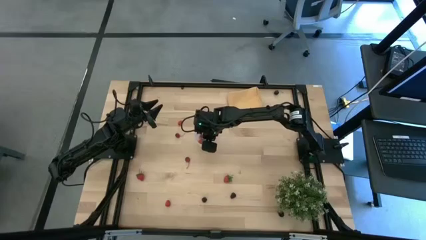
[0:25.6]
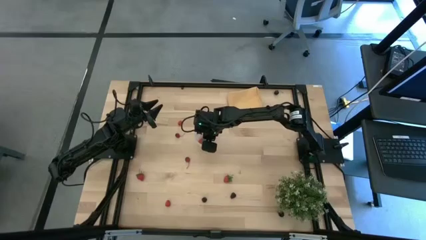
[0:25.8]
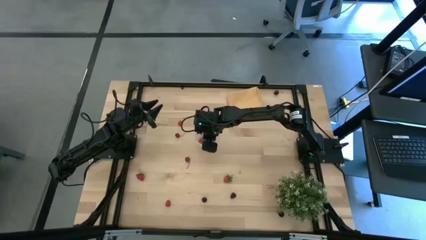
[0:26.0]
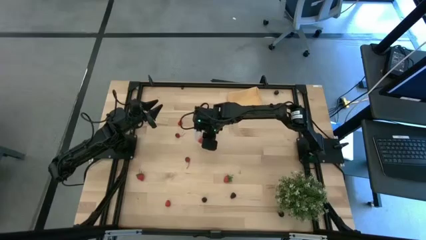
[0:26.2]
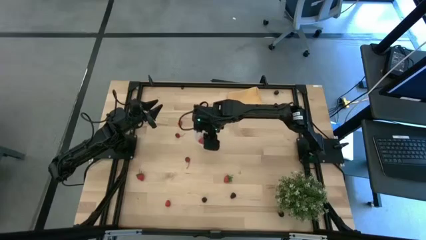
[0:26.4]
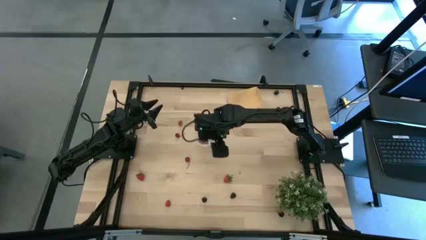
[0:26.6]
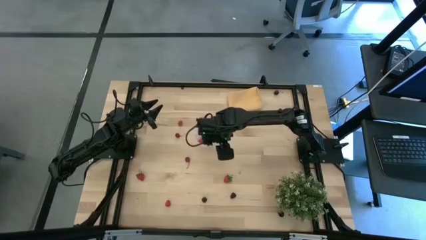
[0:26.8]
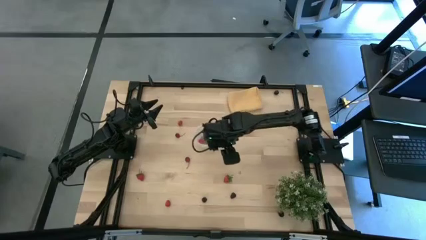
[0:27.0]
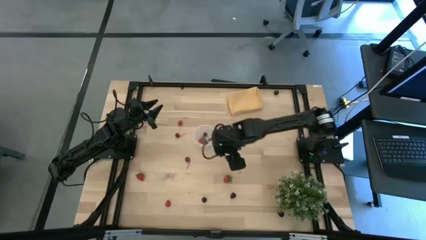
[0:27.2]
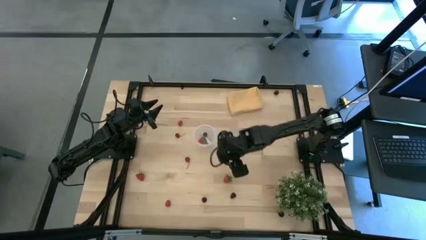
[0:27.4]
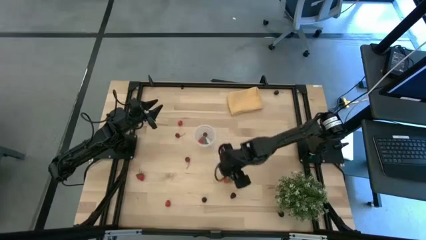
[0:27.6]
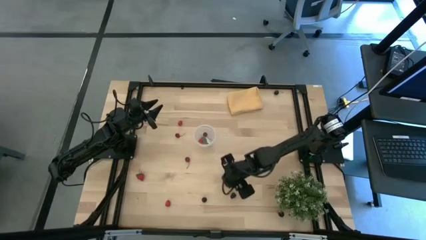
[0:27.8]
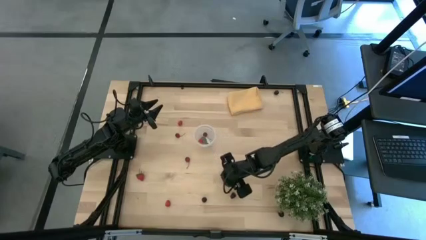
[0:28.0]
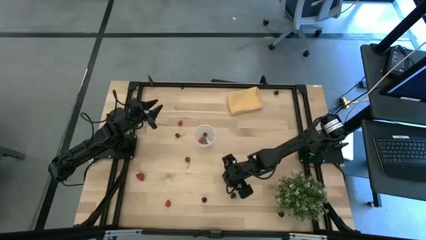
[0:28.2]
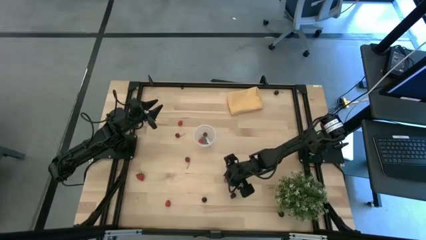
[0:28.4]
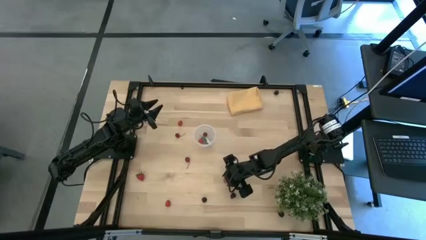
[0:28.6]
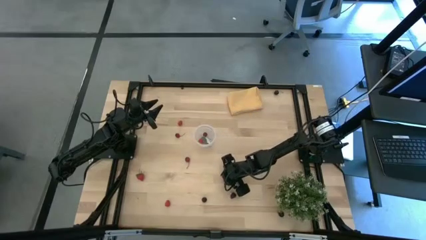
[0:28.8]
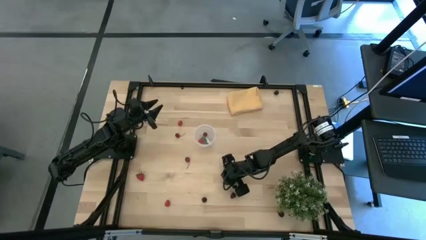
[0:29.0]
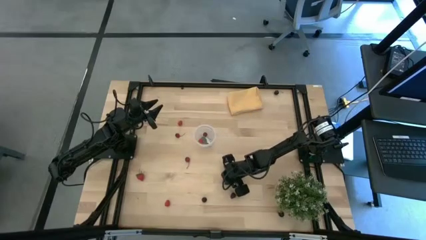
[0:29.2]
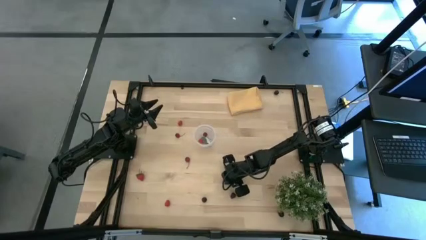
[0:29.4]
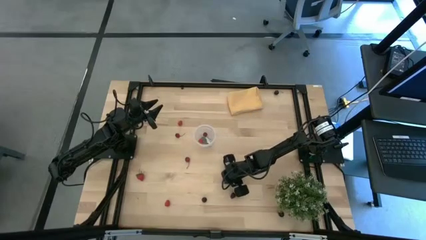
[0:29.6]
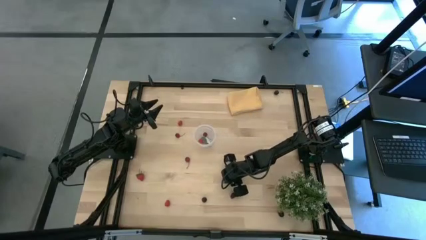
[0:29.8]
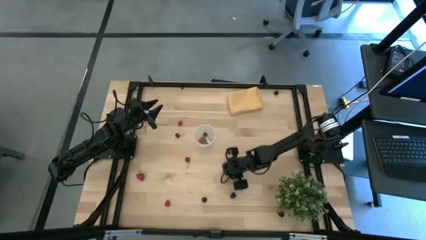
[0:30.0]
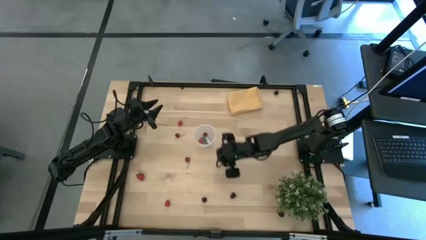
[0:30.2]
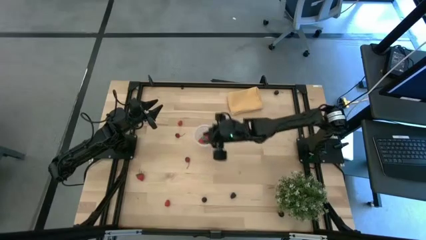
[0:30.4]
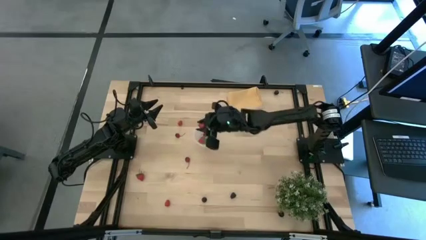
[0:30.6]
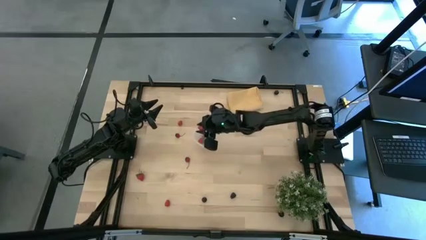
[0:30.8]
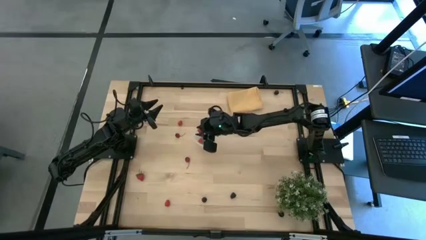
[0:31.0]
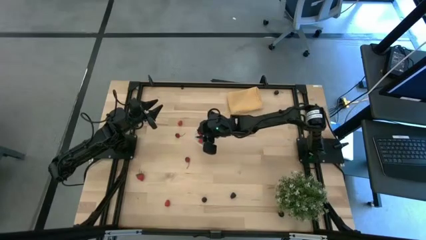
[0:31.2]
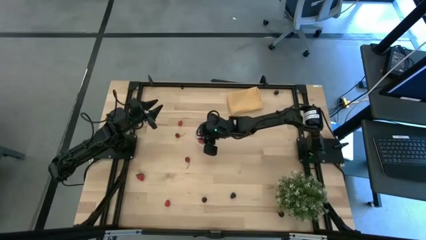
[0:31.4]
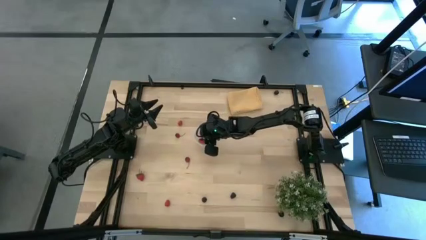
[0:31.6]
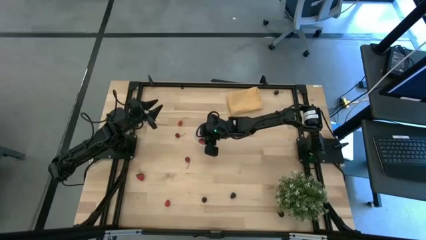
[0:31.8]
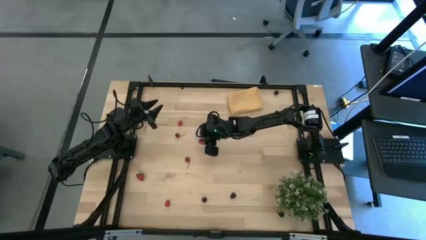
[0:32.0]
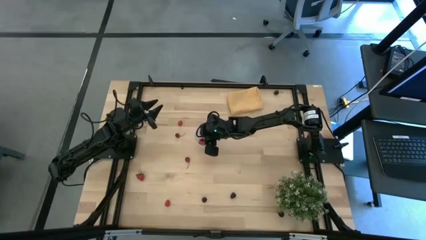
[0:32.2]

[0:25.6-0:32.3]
Task: Pick and placing Produce into tupperware
Put the right red strawberry into the transparent container

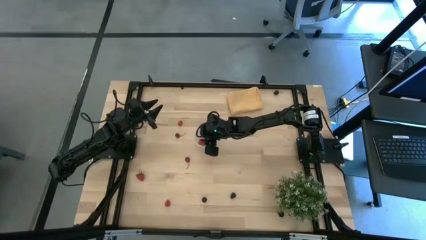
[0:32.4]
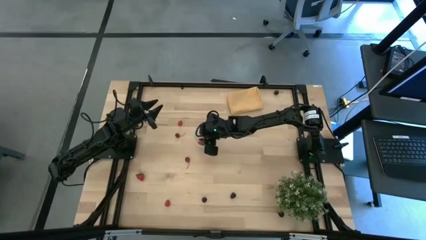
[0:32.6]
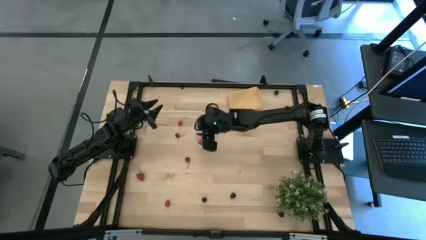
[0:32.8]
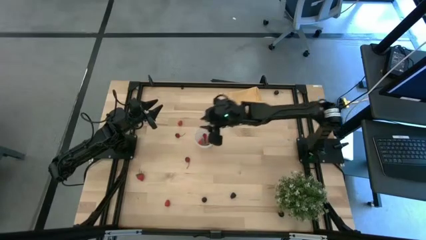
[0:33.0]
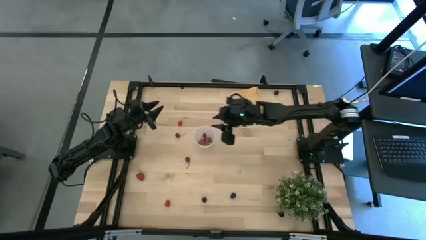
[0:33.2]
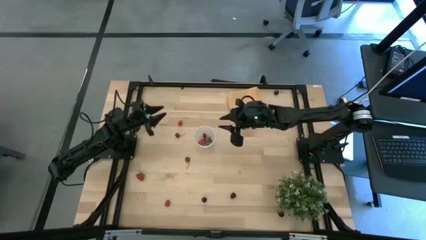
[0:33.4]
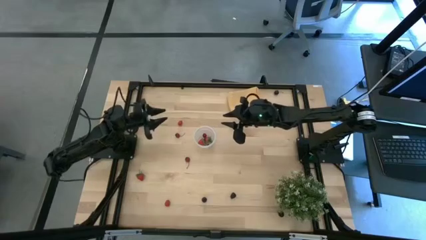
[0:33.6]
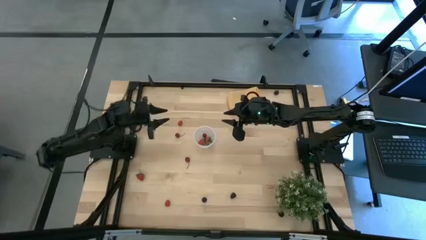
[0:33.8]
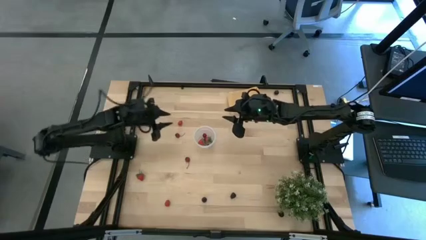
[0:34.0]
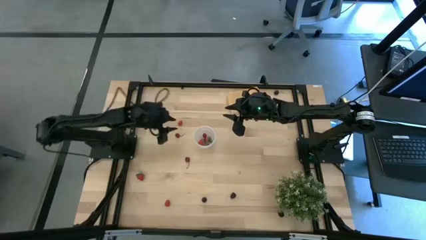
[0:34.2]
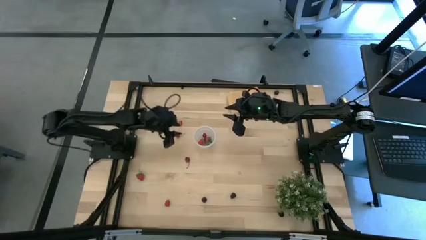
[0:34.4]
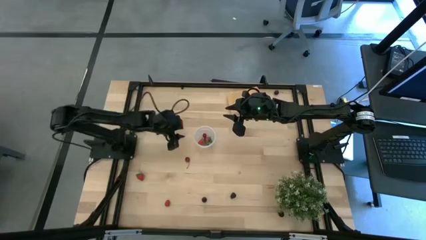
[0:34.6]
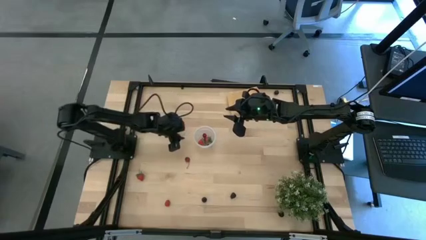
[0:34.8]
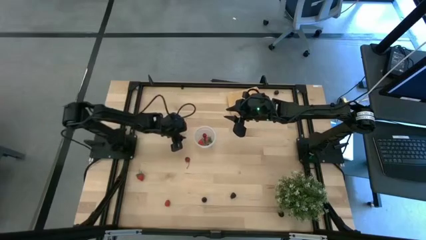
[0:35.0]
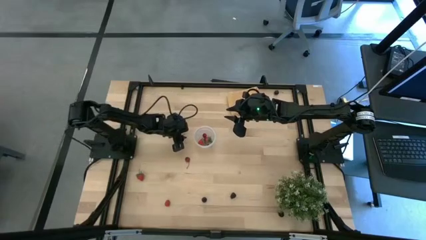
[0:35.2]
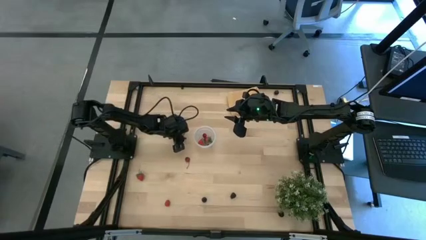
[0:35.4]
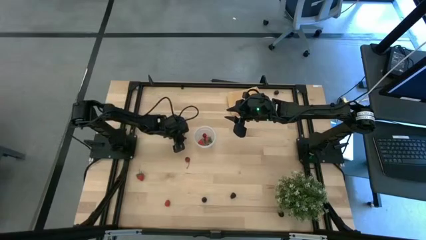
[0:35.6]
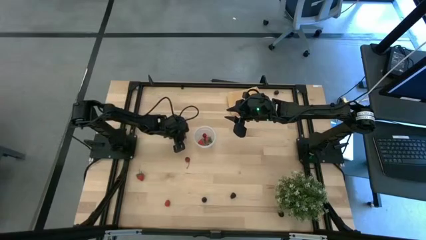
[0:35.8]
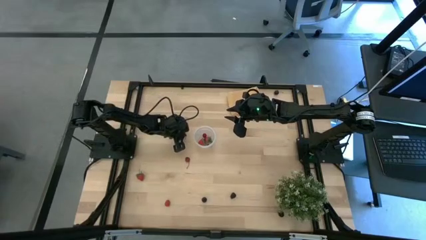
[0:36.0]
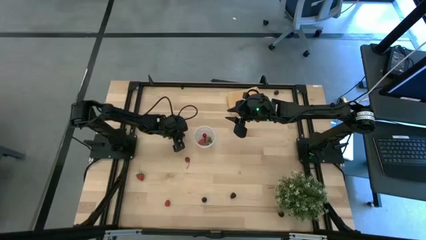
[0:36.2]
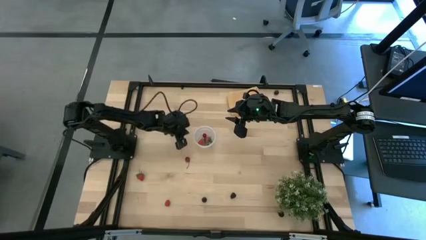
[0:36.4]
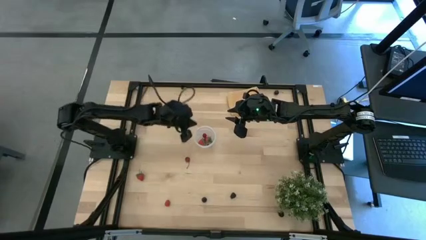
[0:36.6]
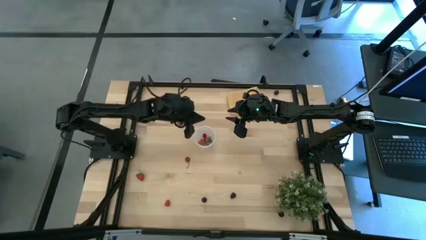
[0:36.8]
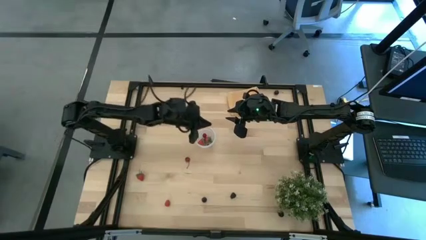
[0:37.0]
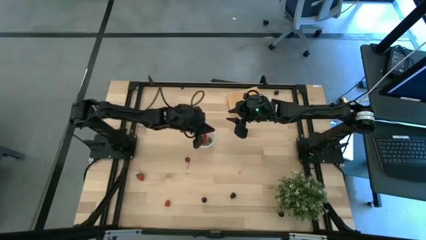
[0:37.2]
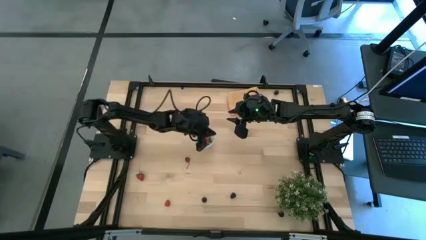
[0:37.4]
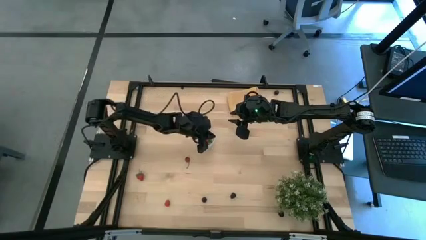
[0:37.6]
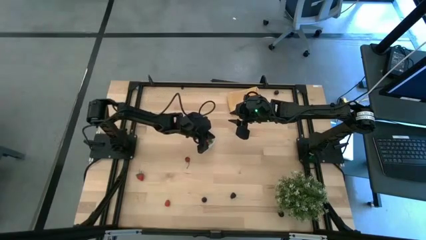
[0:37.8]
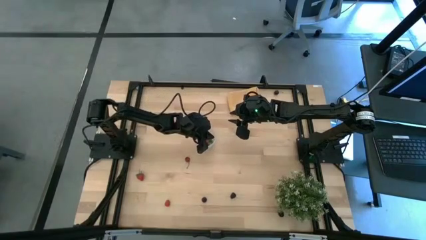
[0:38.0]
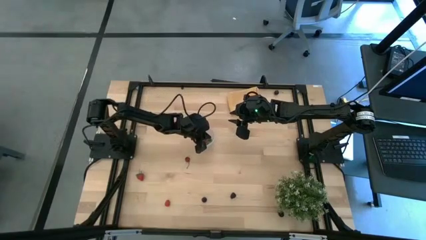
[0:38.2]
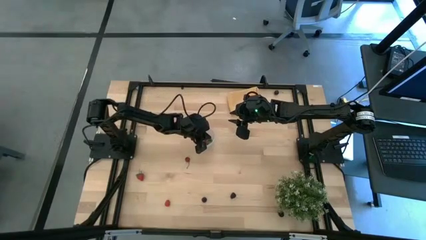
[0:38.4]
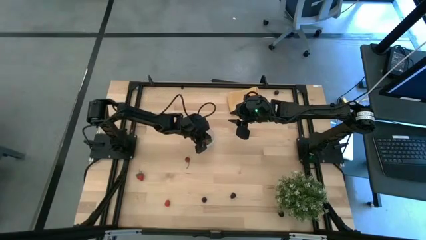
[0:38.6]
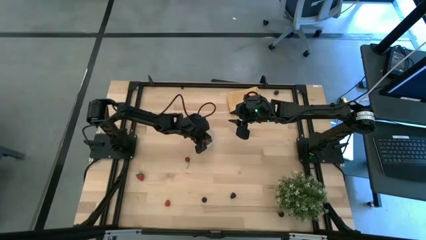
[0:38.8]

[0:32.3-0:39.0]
Put the top red cherry into the transparent container

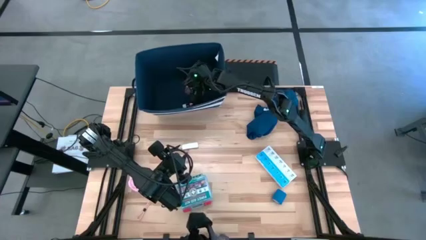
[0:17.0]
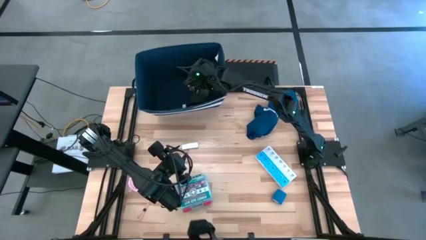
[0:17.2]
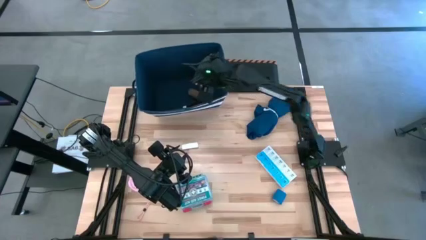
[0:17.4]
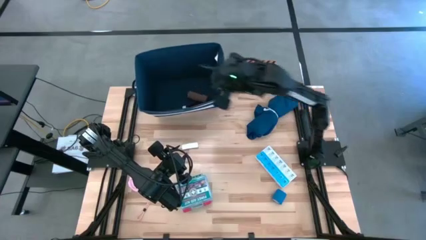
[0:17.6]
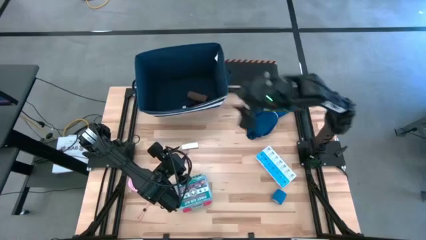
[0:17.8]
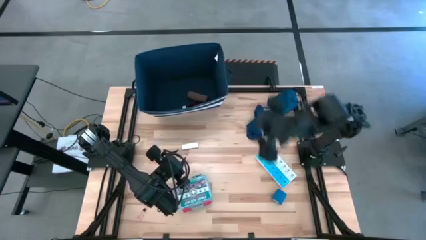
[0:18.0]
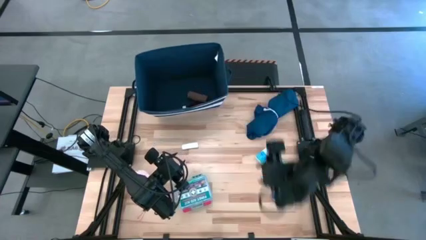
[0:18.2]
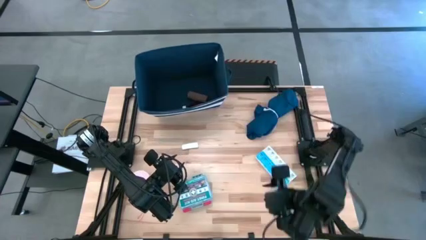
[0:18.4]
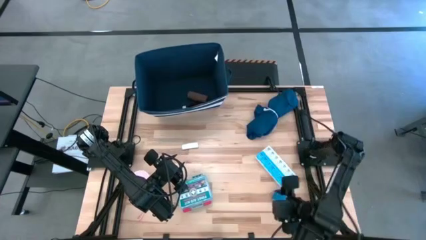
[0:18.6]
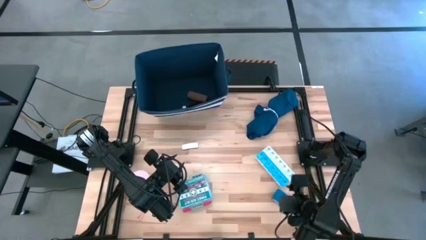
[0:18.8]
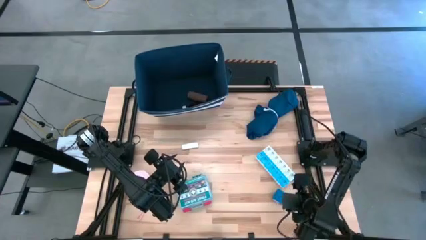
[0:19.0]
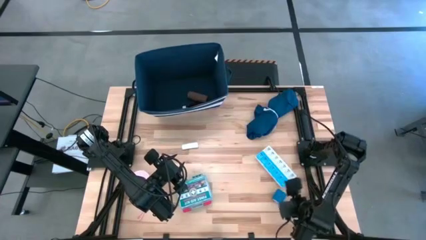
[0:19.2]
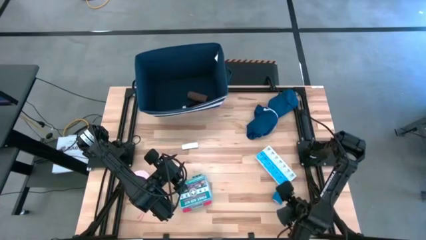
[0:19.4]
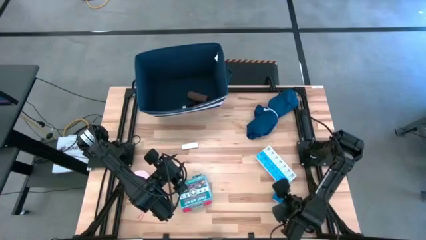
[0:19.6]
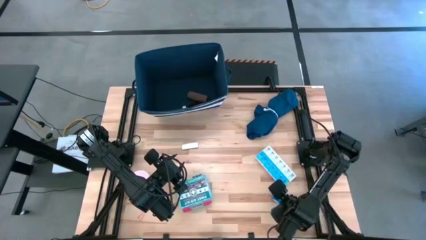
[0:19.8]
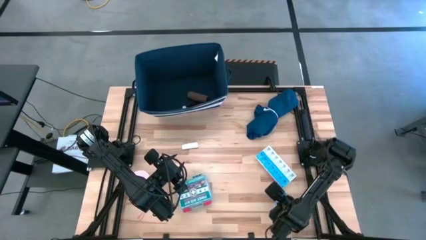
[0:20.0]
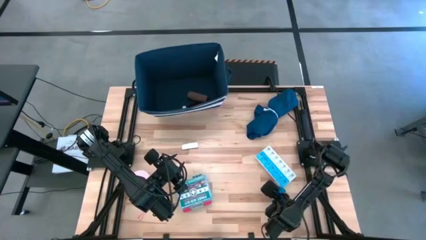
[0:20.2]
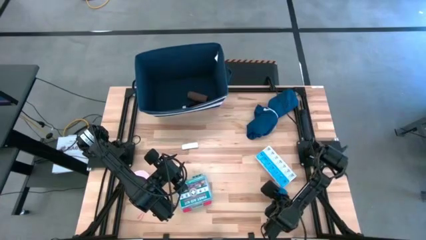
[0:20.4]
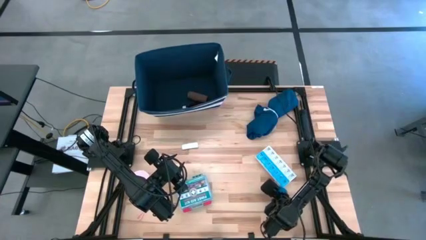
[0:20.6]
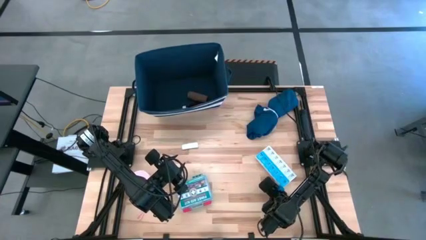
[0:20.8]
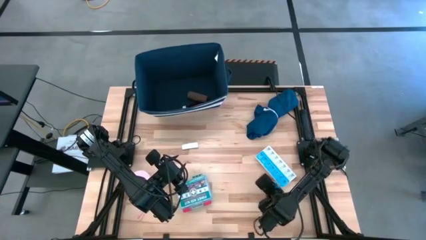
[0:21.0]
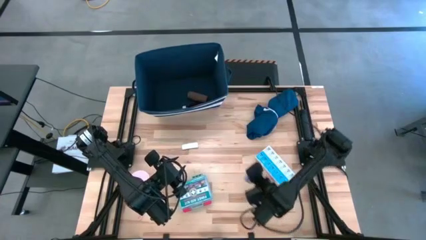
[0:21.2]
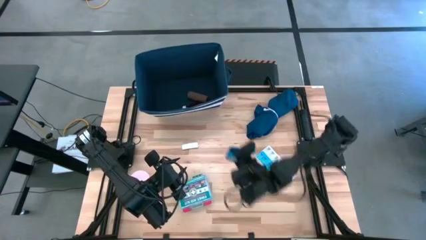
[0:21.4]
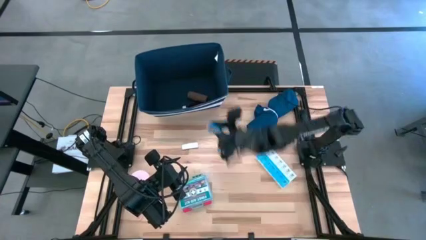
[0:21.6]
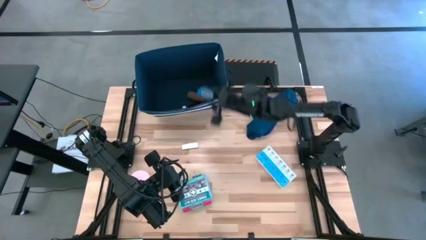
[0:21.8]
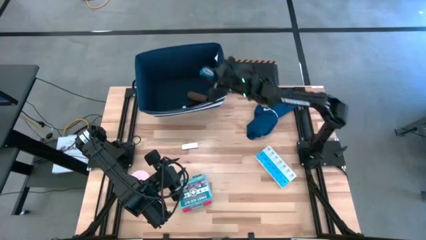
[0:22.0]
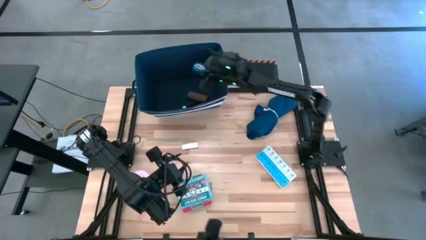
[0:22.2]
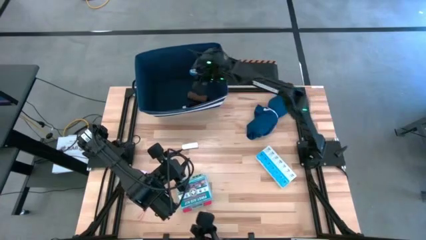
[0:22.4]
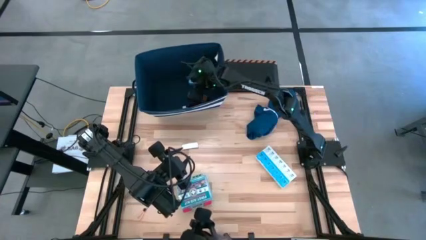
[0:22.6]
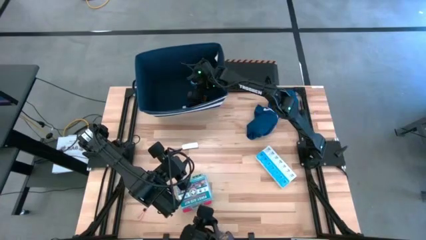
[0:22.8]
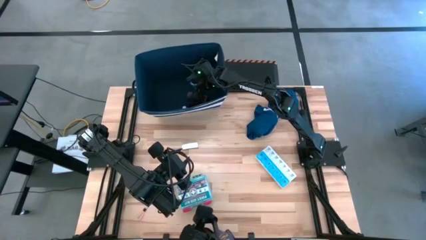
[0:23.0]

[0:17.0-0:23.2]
Task: Pick & place medical supplies in basket/bin
Put the rolled blue bandage into the blue bin
